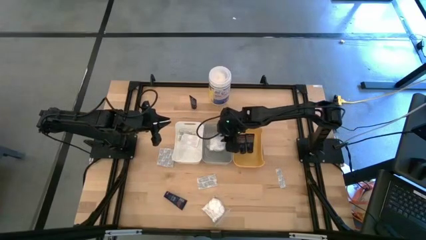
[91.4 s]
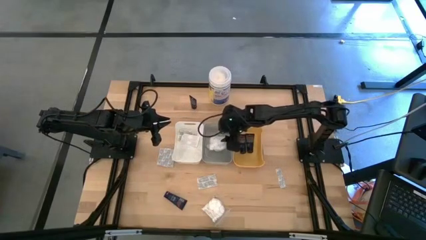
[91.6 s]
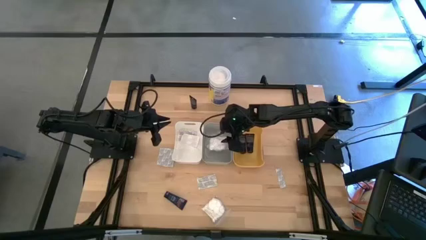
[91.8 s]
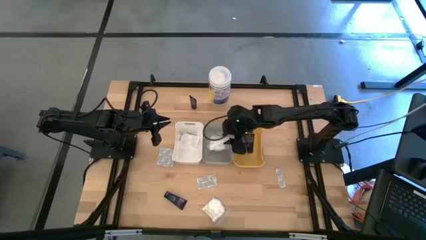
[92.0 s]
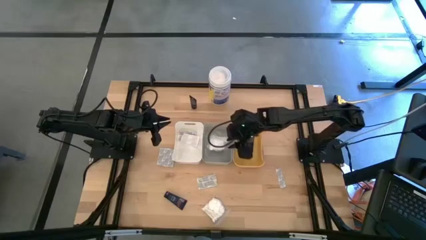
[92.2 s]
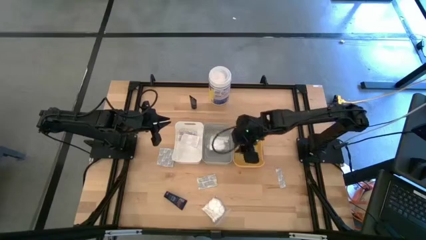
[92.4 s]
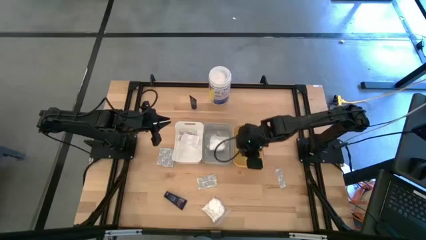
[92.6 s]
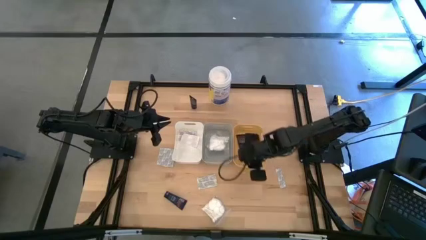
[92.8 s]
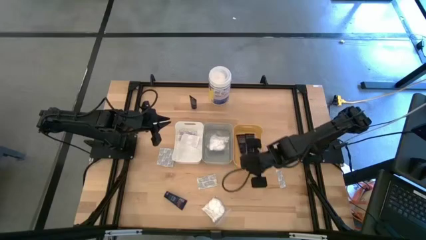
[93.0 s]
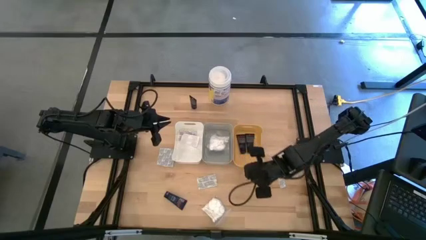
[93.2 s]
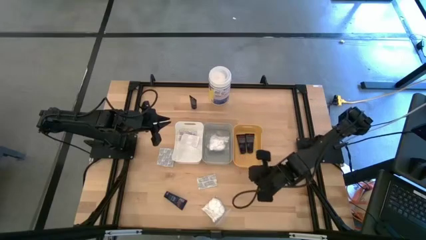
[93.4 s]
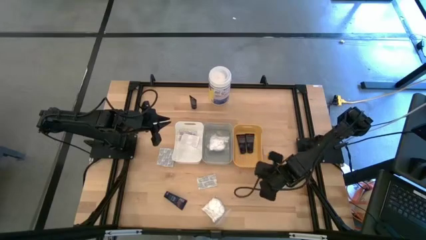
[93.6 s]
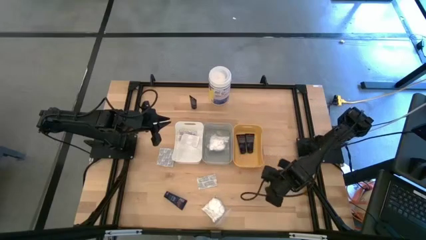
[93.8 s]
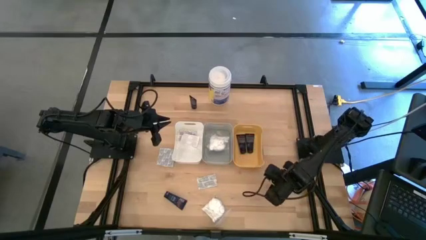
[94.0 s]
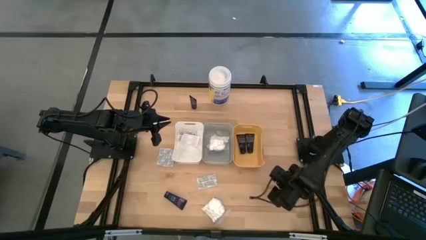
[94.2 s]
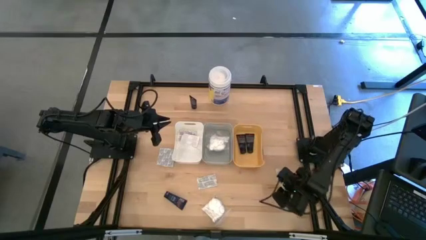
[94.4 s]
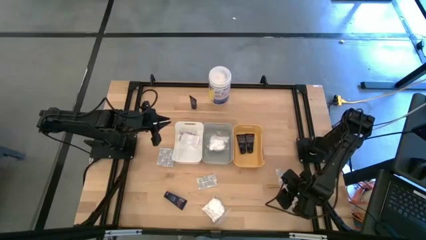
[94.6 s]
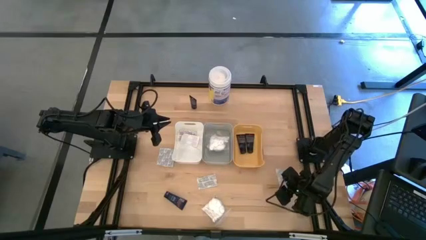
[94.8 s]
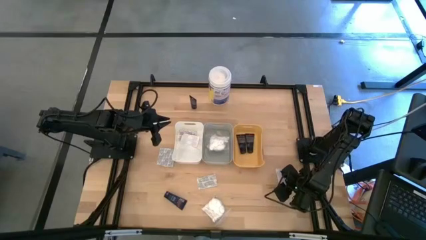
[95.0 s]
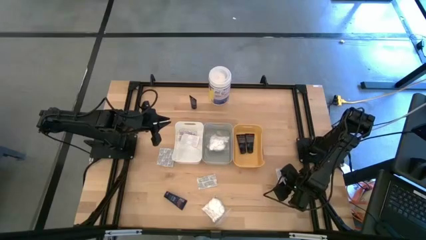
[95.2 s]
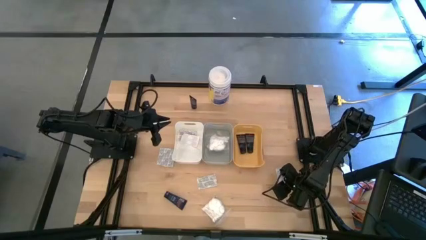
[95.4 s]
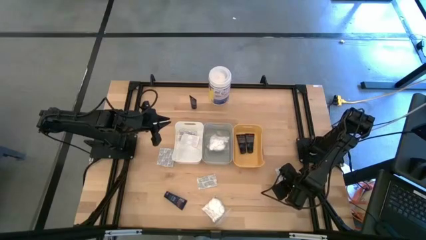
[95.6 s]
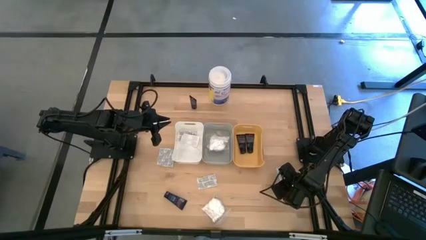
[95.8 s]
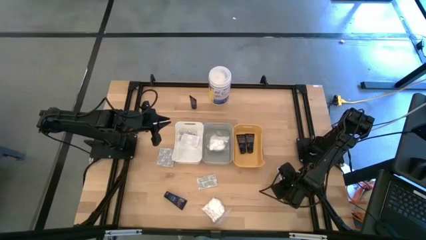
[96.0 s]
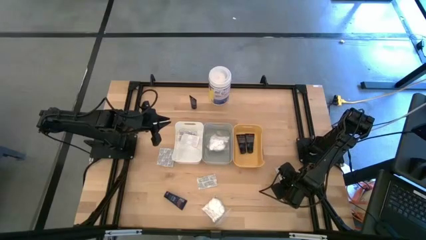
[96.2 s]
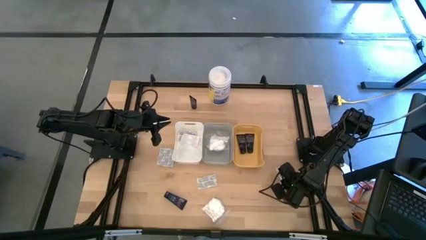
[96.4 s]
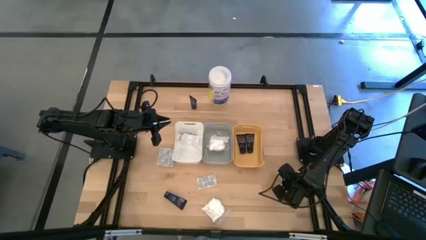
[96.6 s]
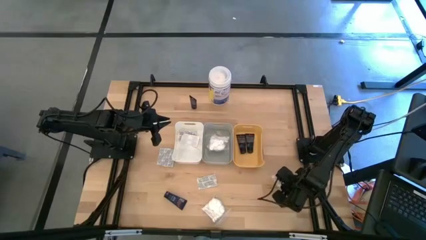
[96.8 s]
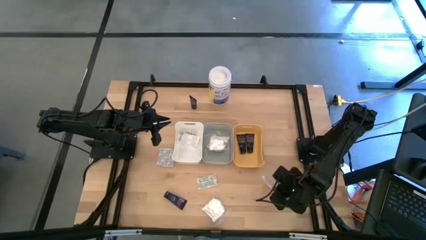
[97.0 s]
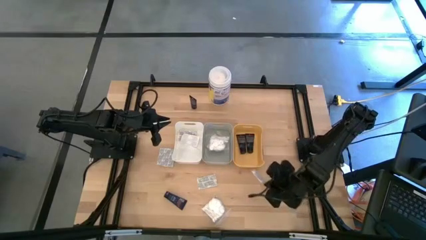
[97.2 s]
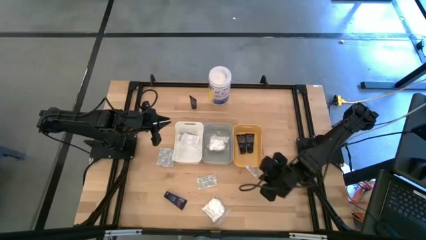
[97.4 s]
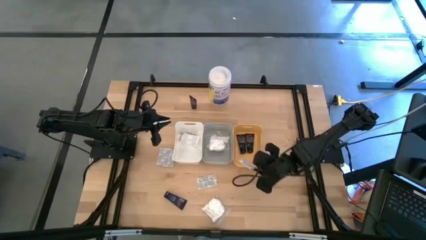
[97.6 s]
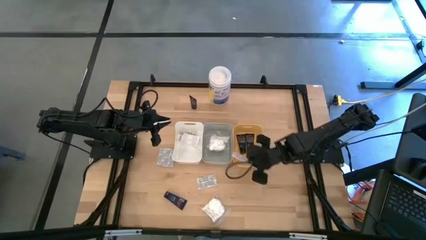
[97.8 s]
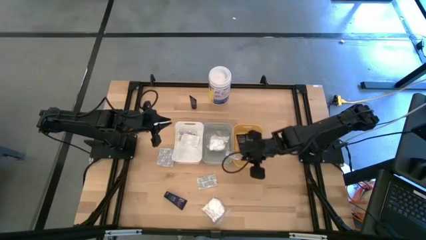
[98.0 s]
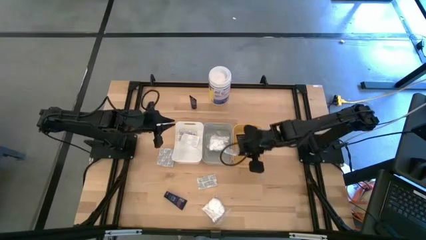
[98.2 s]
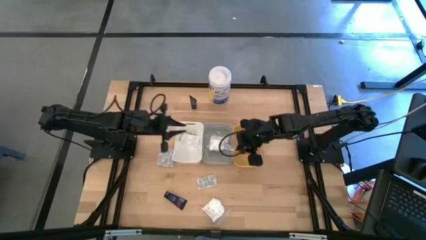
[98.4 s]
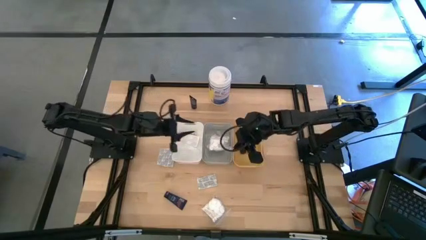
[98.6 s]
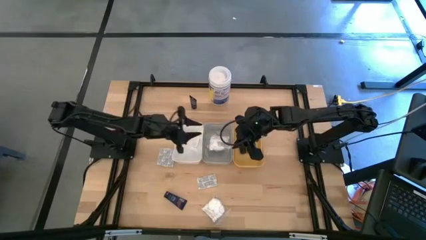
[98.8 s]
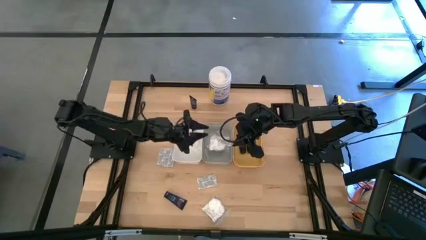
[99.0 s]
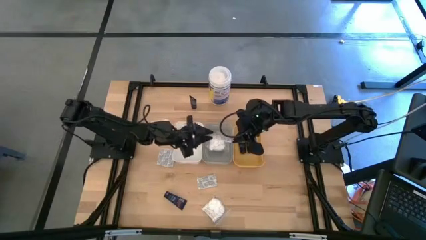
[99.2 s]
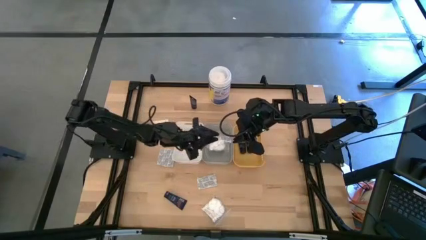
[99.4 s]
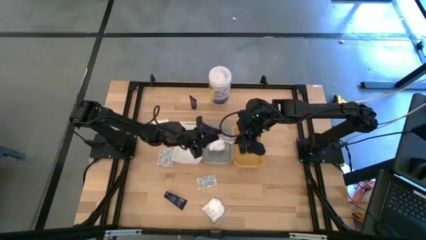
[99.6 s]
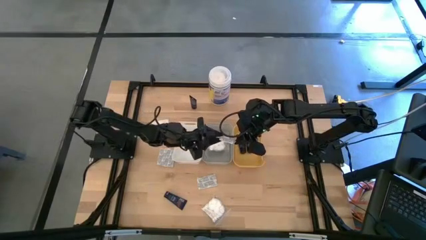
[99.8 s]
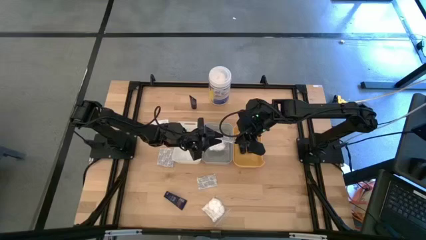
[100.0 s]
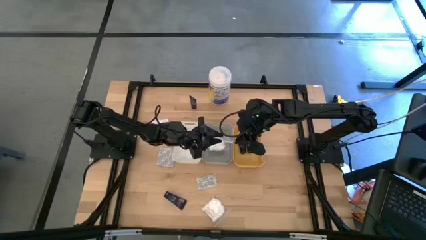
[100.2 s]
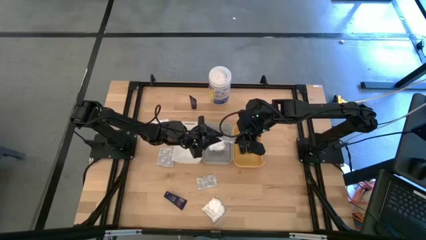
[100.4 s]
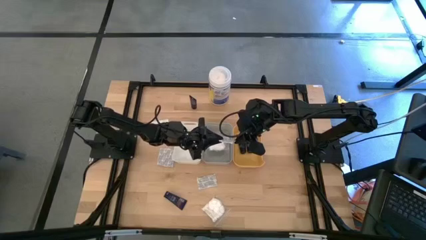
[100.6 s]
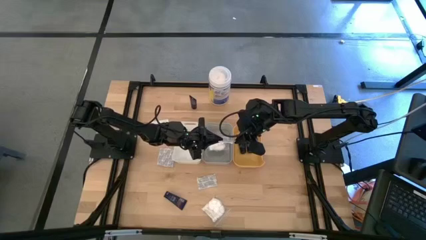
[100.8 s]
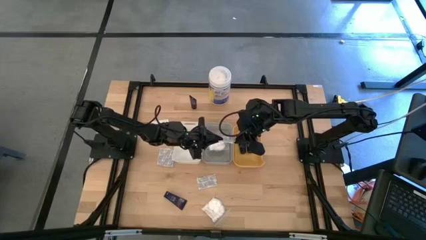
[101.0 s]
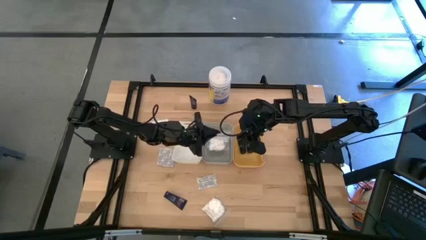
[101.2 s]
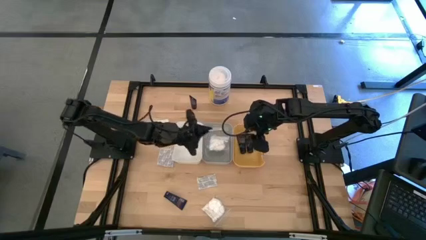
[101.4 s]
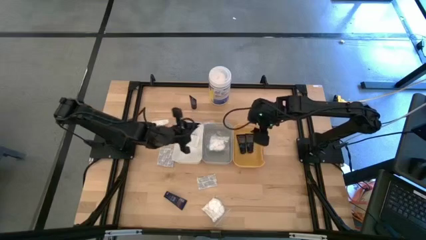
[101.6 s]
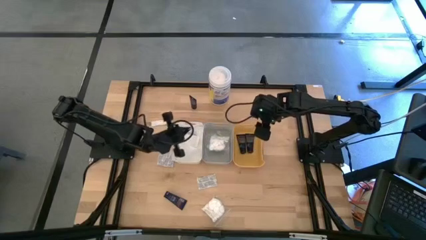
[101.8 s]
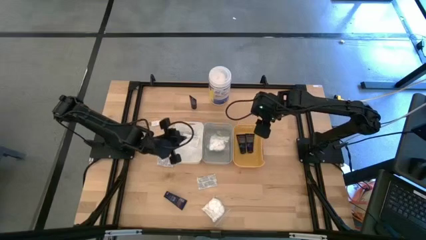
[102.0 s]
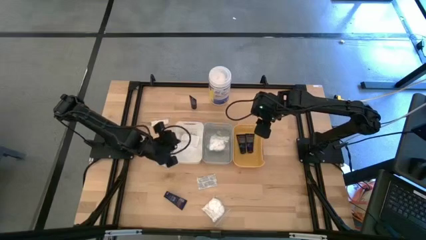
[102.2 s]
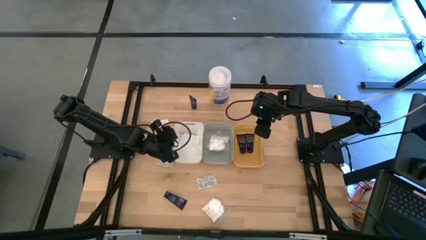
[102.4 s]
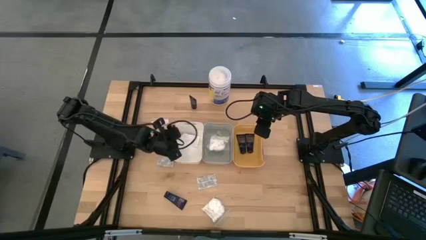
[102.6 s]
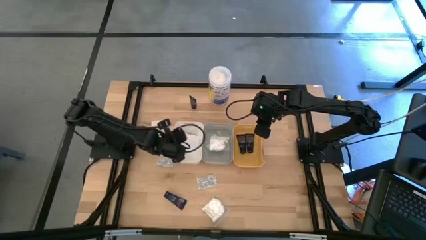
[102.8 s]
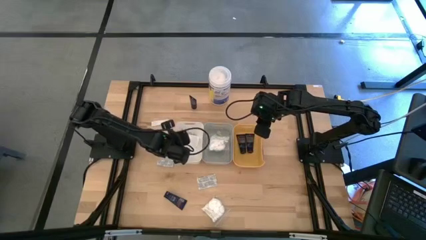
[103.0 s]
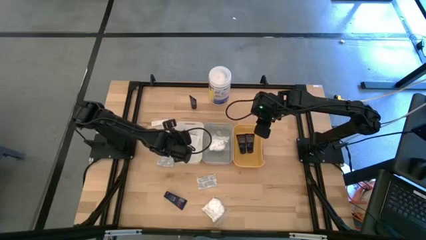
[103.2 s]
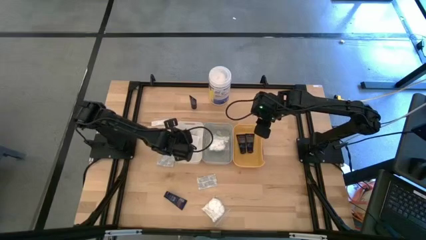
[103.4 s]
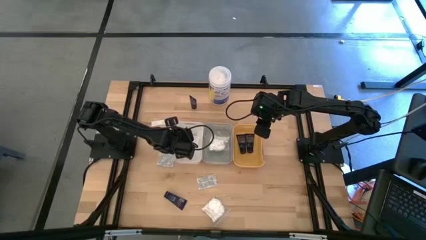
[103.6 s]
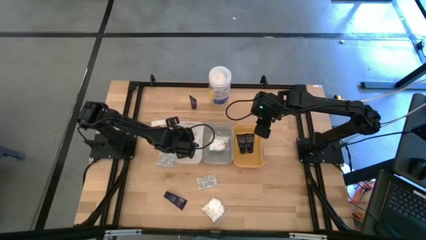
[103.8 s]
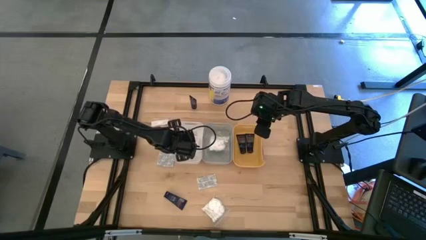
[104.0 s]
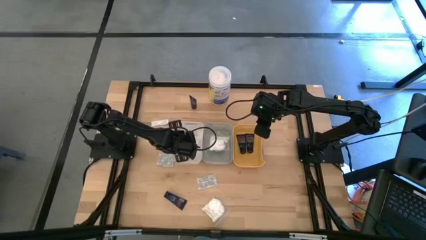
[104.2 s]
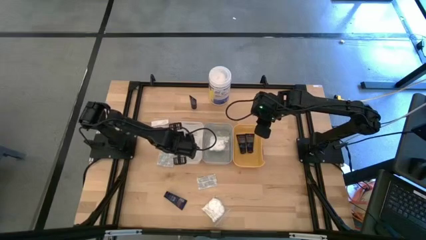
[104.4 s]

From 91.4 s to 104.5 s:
Task: Pick & Place Travel size toiletries
Put the white band-aid into the white bin

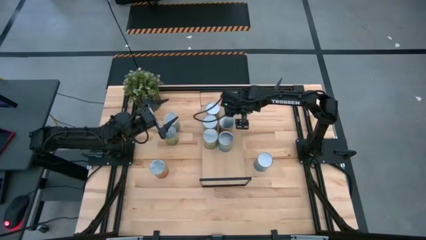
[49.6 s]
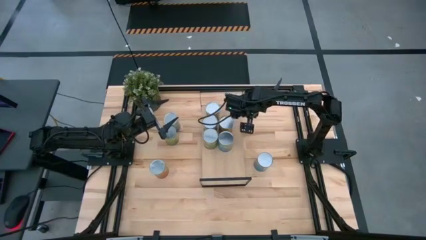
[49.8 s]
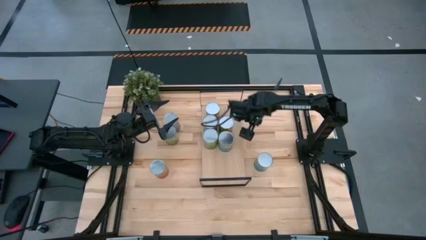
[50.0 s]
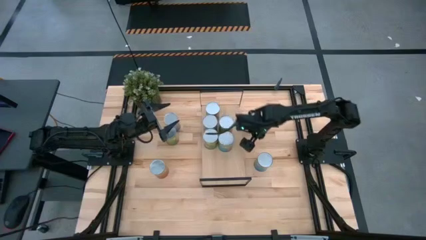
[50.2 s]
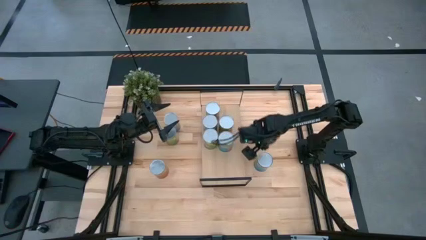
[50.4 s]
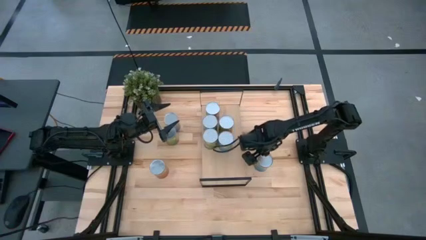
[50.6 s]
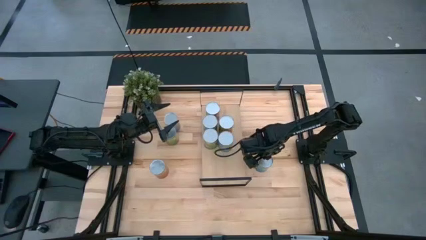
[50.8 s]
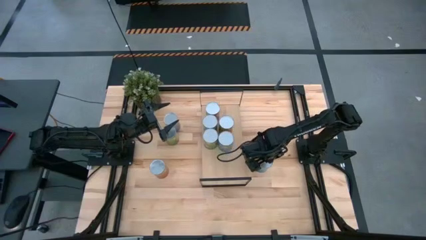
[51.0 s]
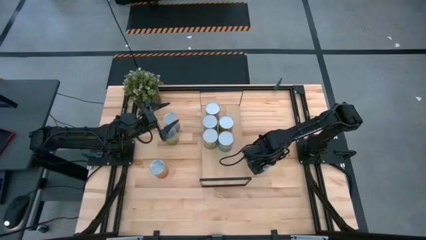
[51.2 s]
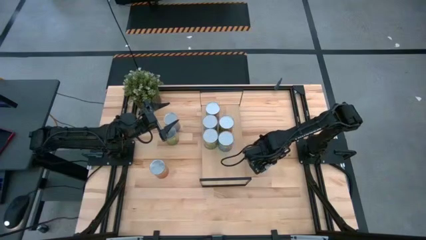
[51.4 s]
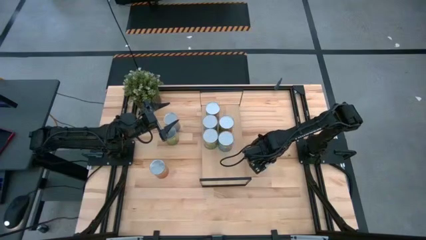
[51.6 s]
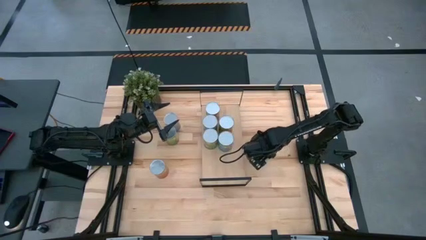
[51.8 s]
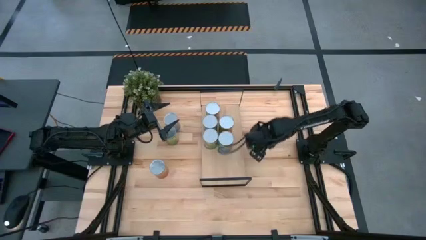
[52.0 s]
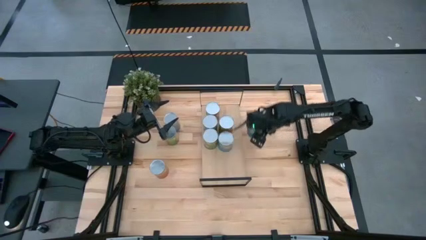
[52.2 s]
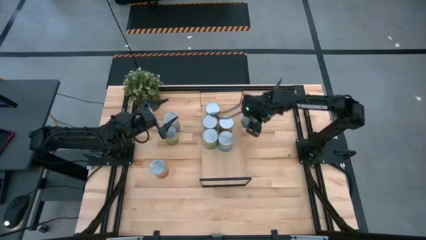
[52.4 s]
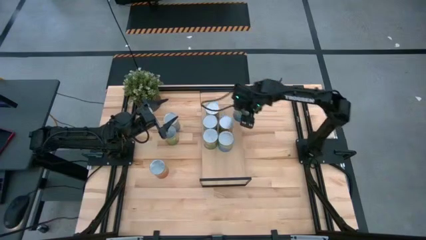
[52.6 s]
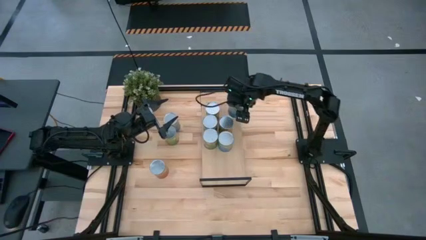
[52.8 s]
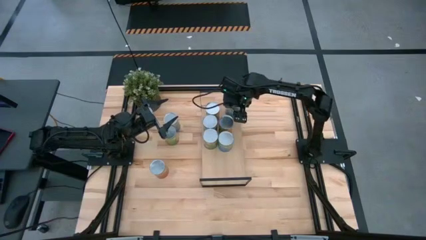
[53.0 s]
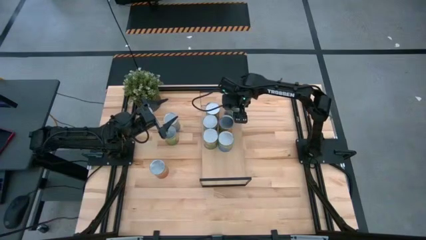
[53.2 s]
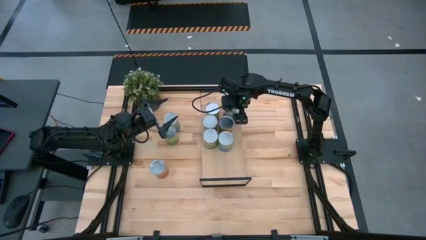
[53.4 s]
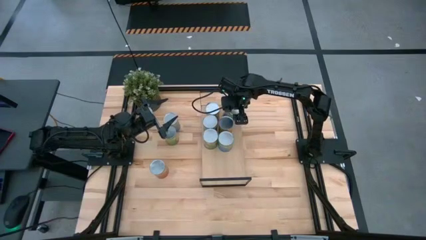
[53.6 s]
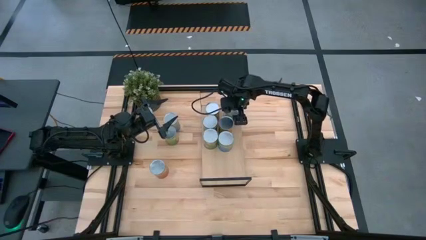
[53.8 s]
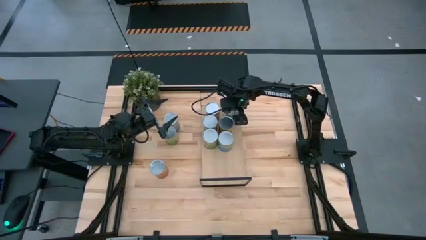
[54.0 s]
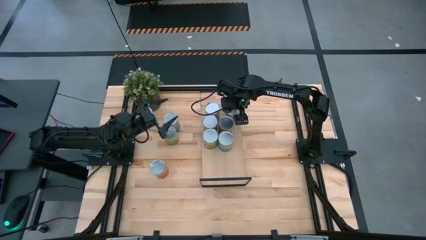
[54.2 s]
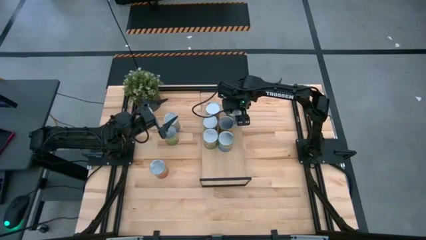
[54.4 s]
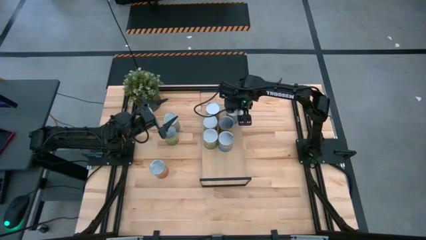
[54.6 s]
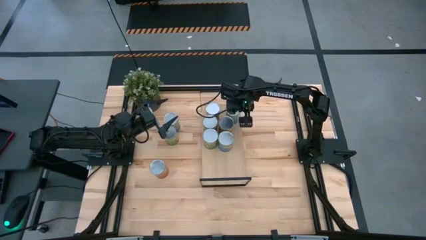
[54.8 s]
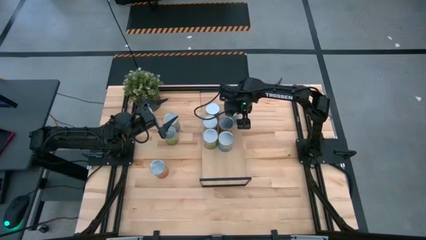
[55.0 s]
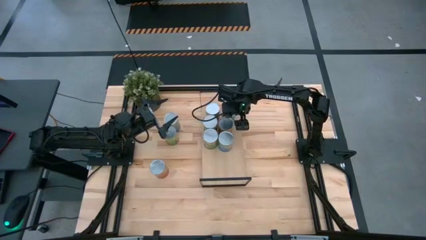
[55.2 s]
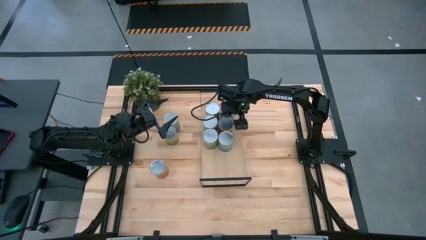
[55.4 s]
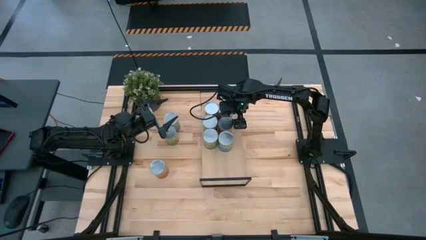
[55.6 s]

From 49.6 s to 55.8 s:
Task: Pick and place cans onto a shelf
Put the canned cherries on the shelf
